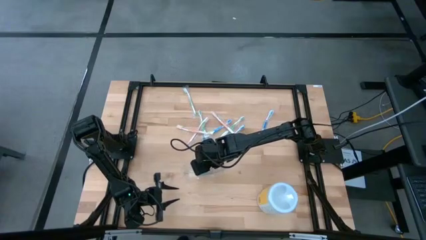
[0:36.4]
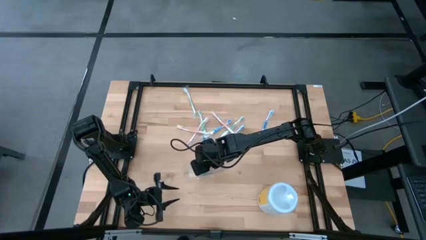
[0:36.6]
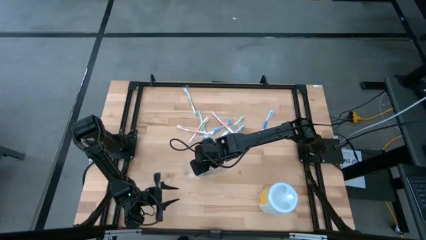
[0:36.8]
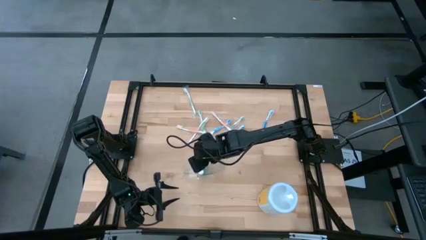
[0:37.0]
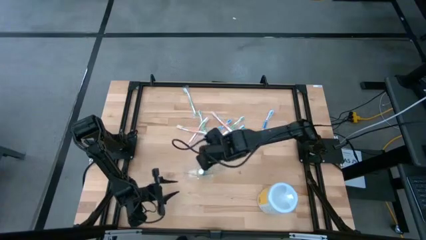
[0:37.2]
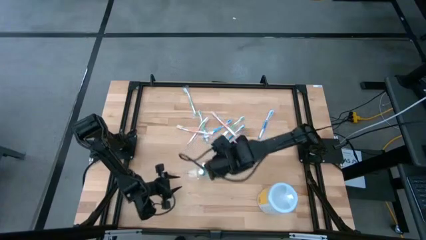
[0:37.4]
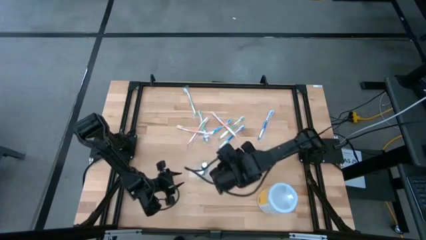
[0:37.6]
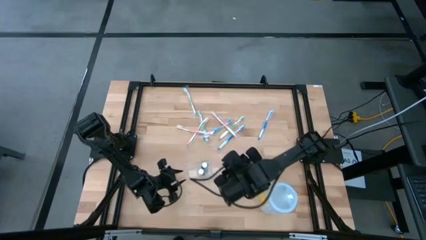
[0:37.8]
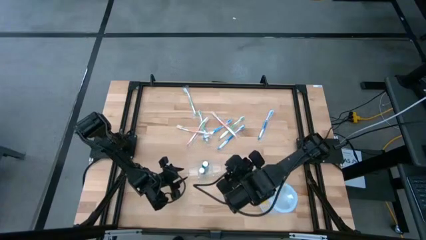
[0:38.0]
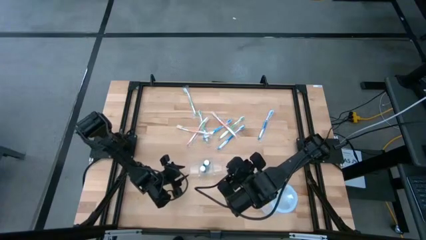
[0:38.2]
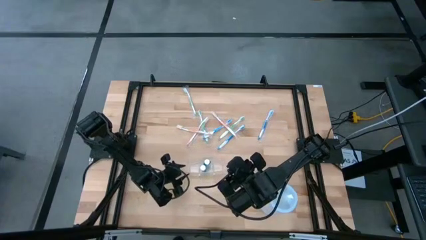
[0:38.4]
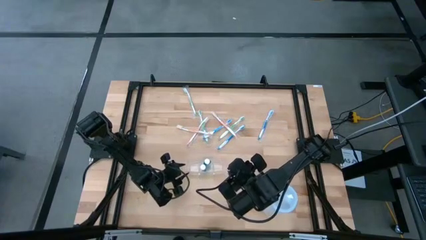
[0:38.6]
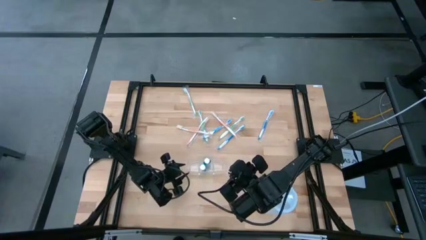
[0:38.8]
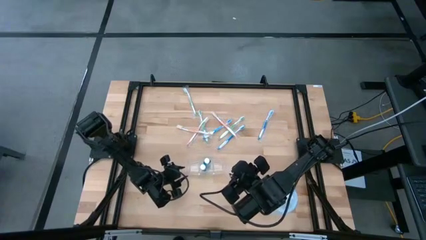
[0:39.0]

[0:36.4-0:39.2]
Task: Pick & Place toothbrushing station
Adjust the transparent organizer

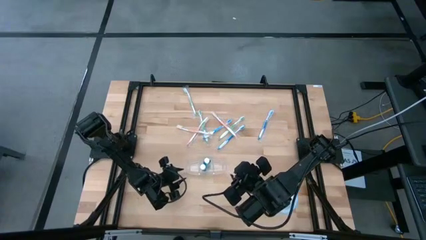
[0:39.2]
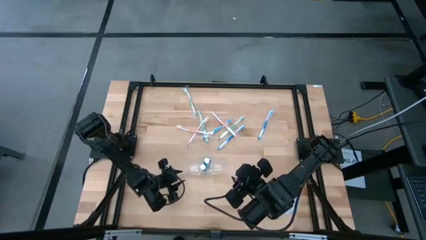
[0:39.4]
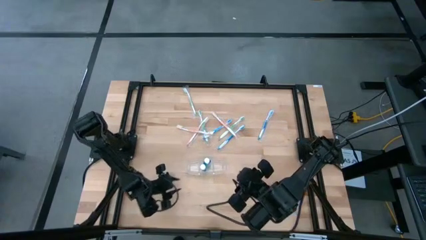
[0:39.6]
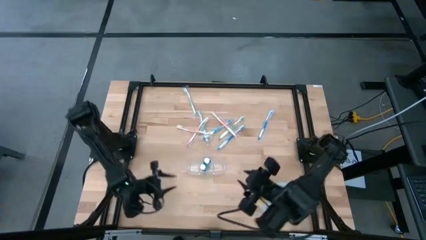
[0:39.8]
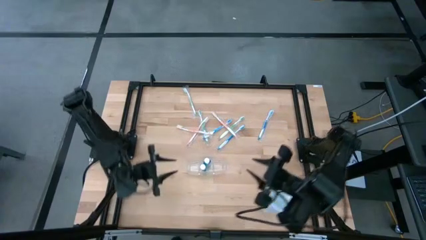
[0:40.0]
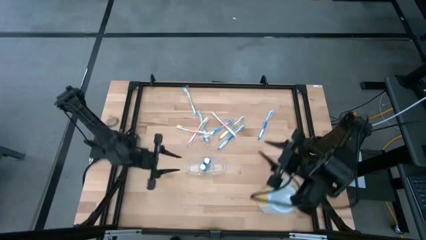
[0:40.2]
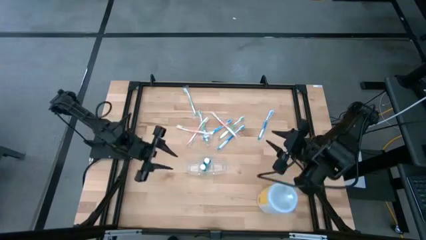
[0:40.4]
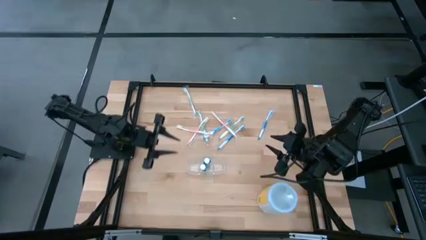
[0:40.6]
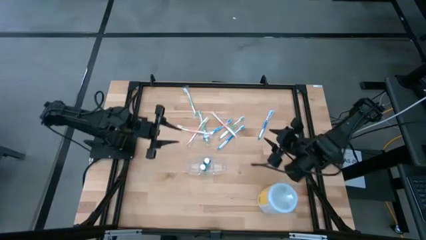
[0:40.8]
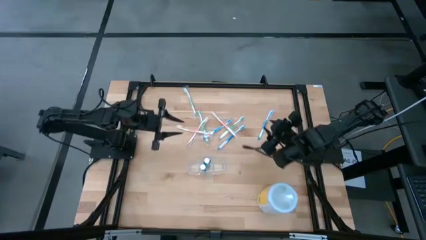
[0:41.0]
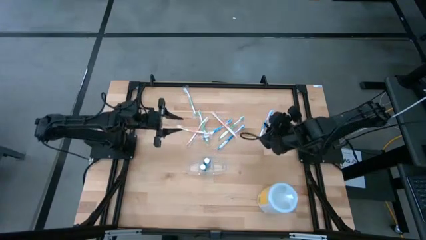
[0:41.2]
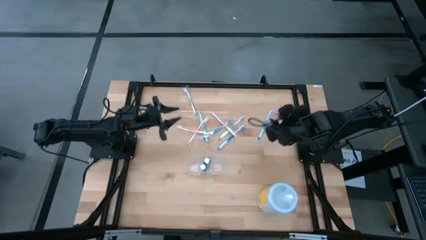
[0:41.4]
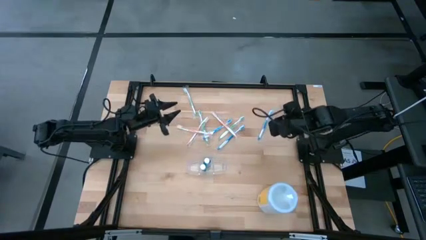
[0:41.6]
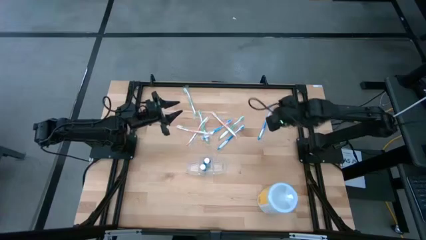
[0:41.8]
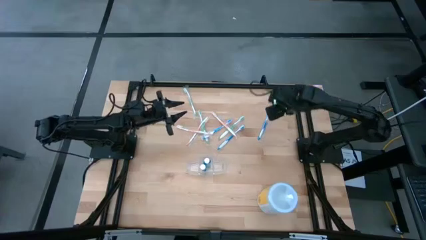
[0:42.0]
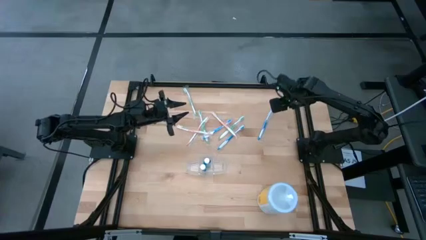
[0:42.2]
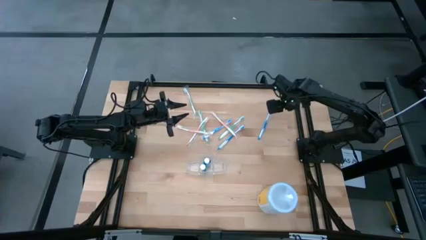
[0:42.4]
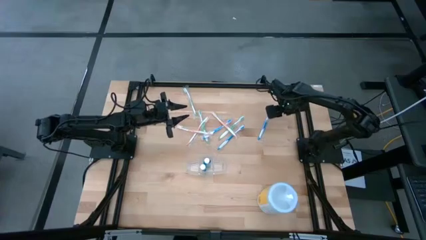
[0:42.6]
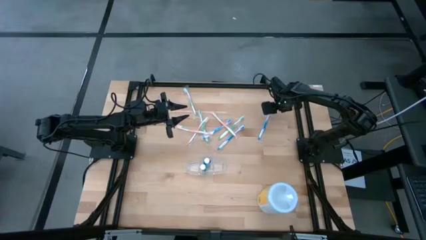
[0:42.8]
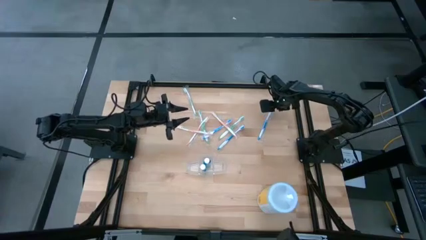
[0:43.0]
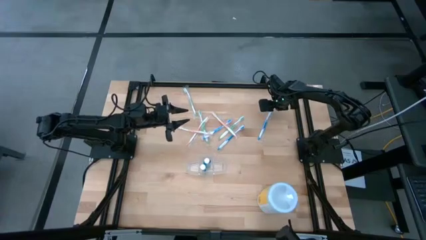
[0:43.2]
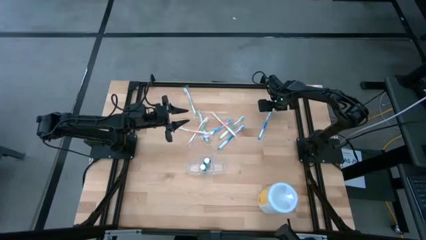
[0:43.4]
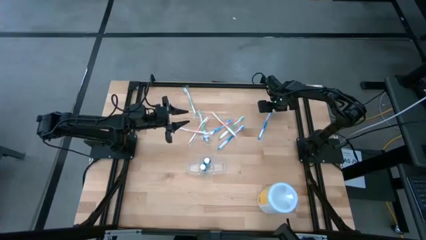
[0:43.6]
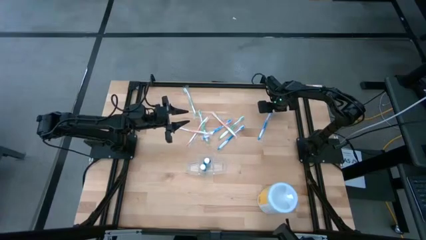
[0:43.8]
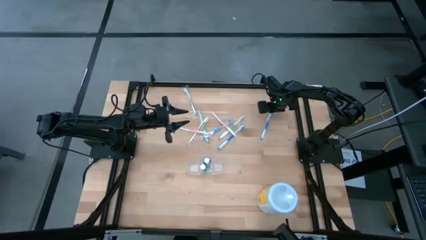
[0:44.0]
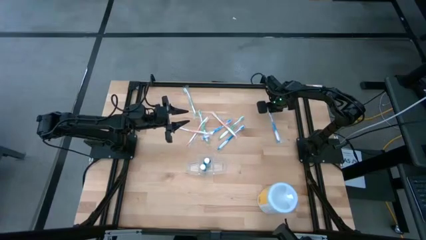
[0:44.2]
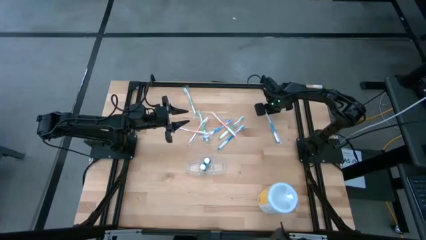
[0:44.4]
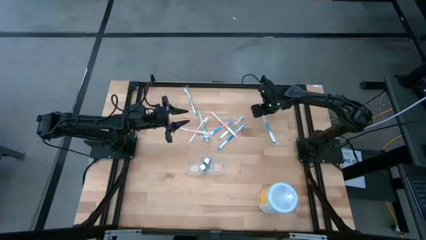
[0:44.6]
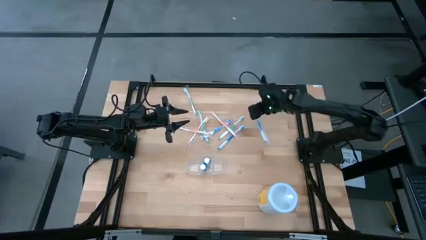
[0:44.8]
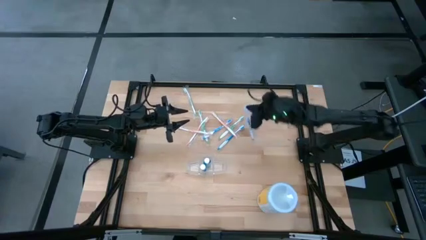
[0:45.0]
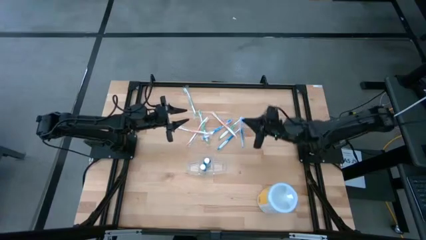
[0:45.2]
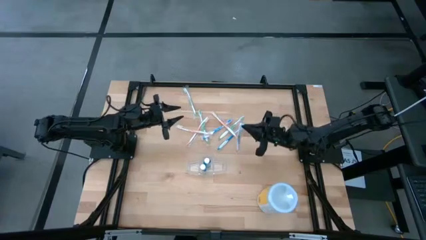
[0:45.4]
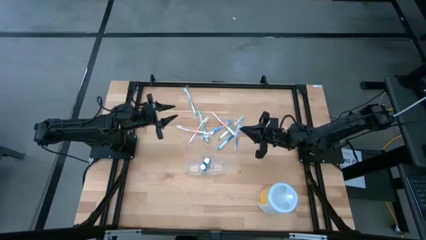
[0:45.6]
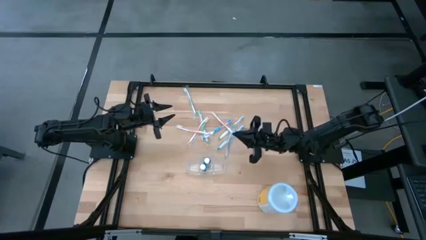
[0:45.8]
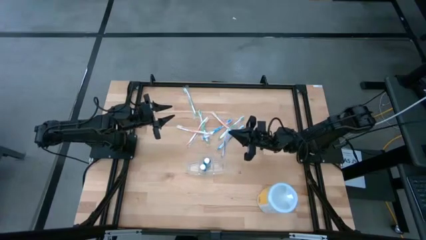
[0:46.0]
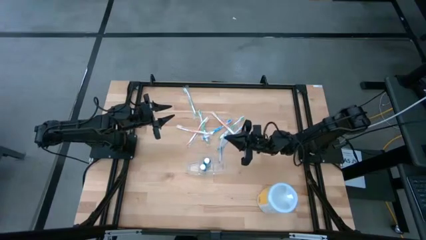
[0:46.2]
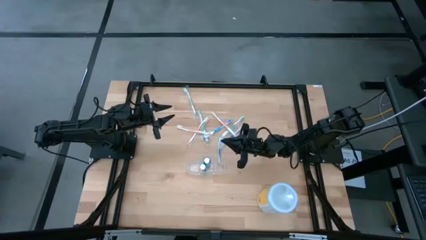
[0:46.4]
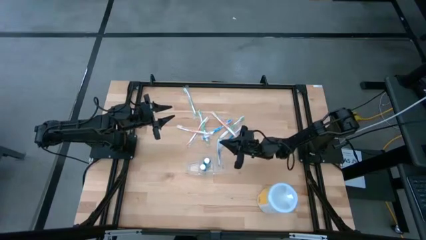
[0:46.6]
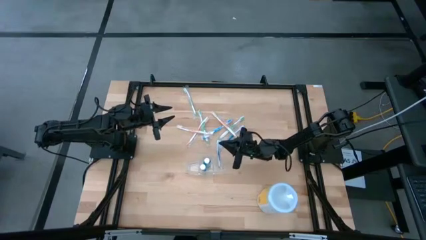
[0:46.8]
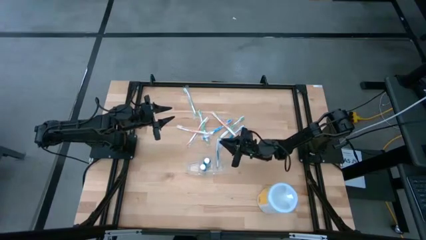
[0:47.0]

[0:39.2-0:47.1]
Put the blue toothbrush into the transparent organizer

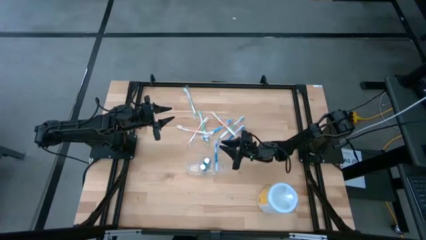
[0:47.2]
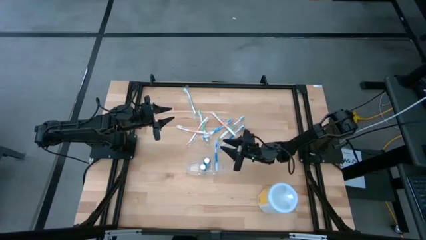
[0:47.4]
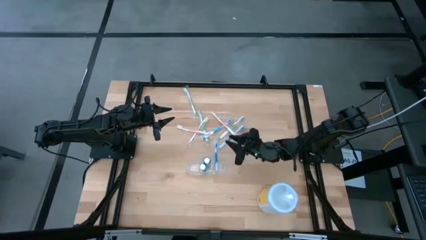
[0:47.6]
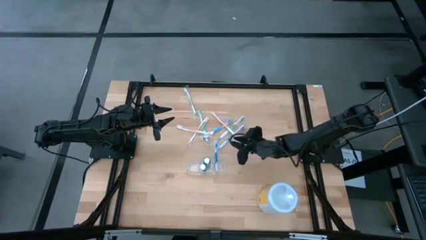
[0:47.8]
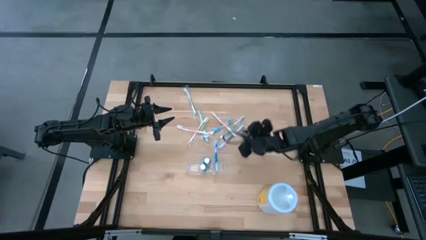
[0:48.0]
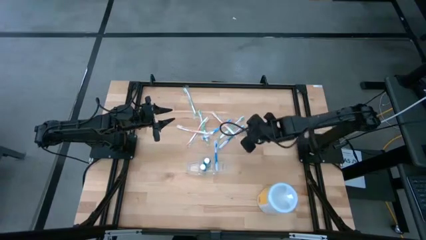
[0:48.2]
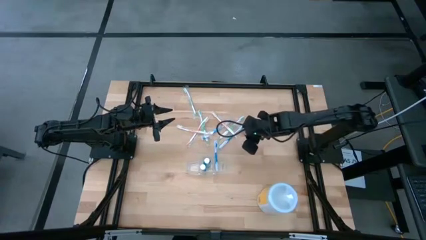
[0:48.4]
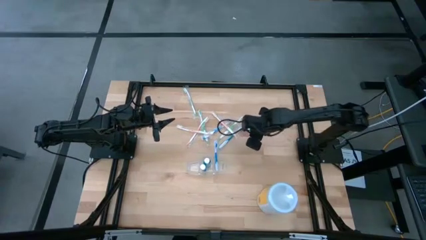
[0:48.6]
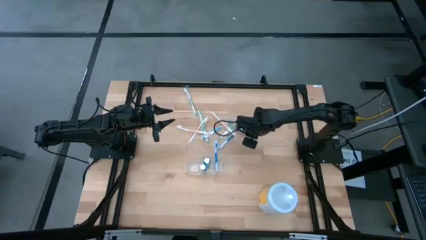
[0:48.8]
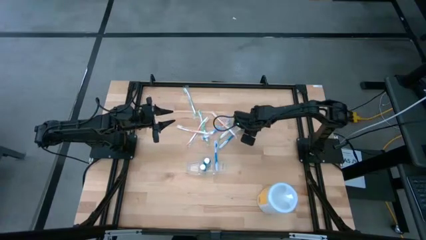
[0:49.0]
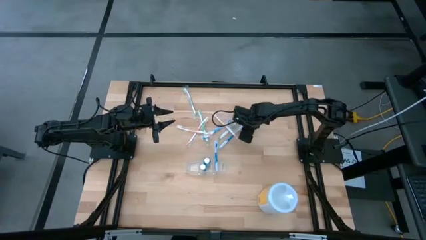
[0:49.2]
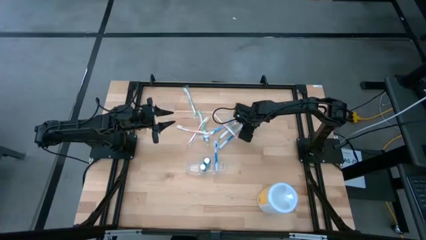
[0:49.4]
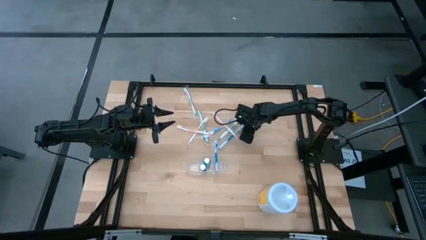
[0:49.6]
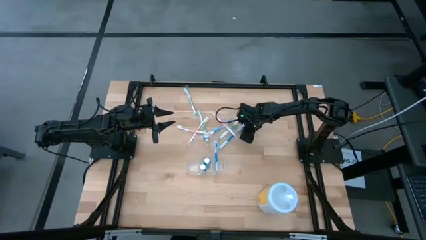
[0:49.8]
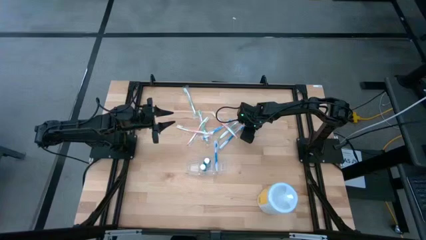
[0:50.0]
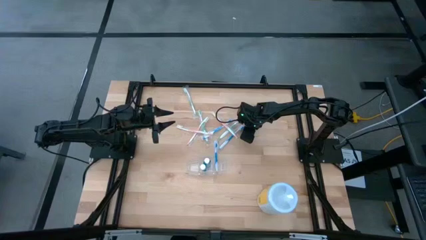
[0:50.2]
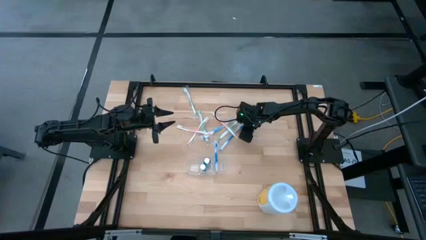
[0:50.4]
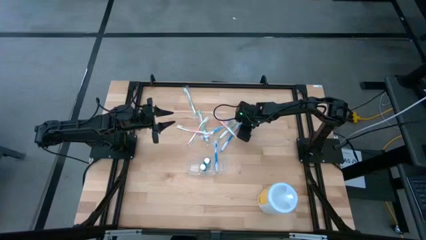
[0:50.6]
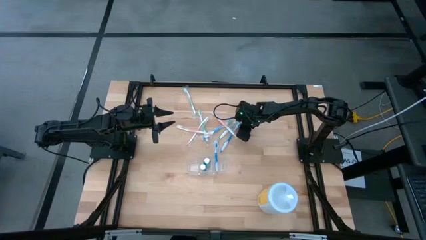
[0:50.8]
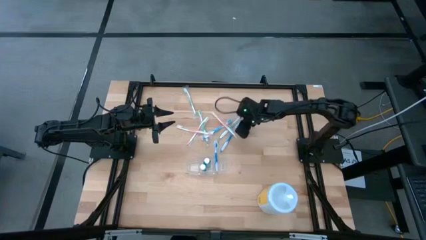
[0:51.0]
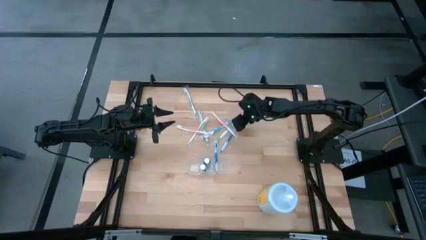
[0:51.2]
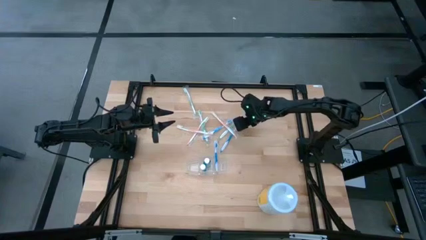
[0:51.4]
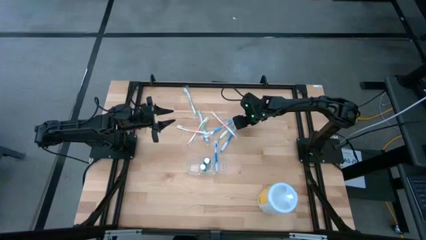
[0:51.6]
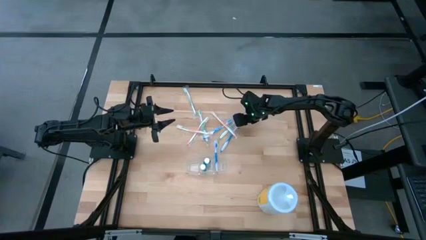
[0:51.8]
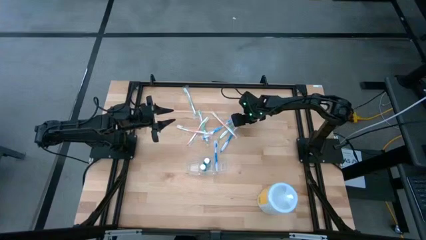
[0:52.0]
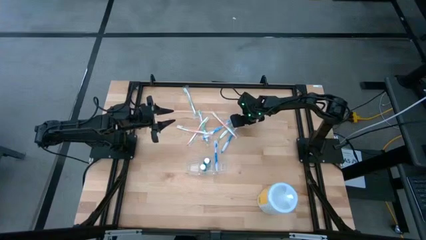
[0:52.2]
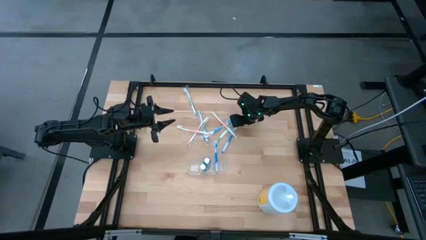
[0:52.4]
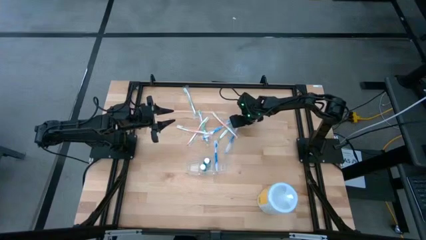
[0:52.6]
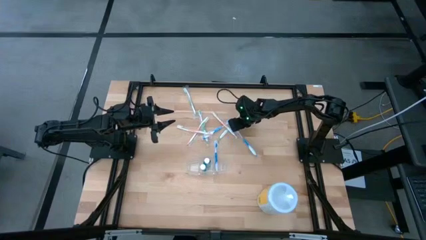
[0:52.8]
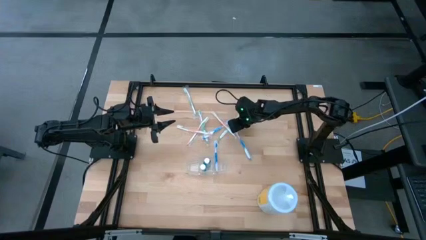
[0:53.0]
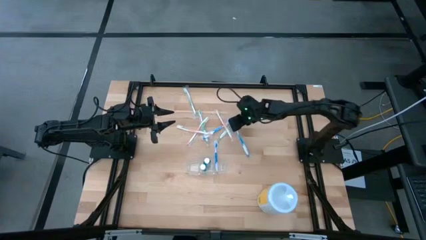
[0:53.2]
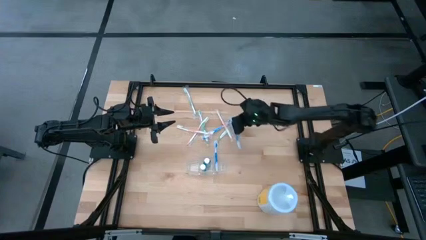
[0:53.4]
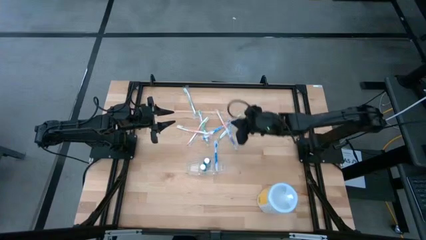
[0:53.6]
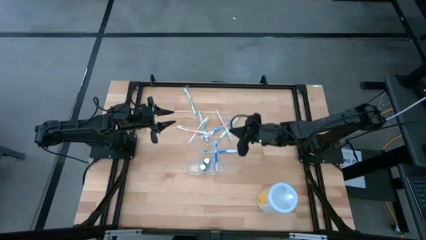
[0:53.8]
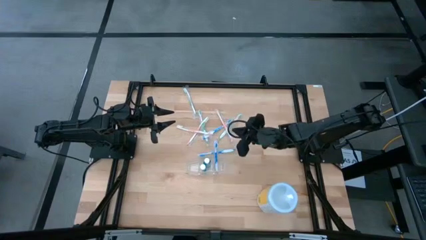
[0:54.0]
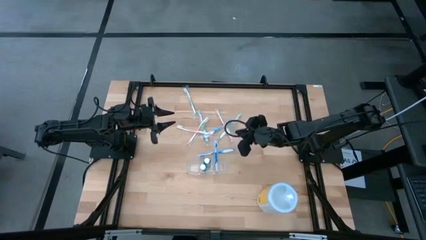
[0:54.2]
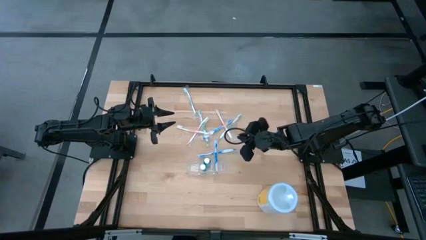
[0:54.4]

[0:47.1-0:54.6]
Put the blue toothbrush into the transparent organizer
